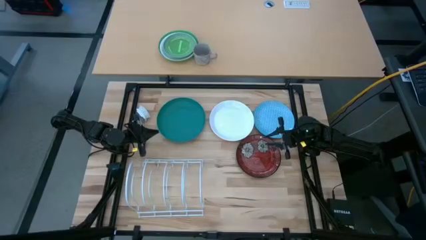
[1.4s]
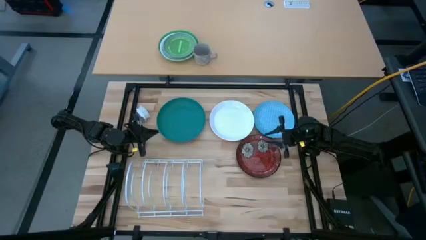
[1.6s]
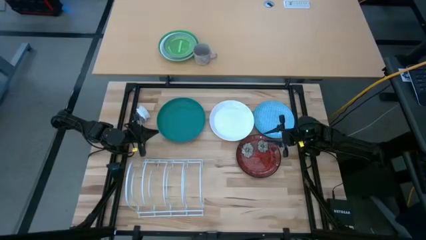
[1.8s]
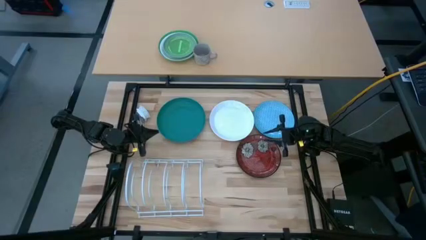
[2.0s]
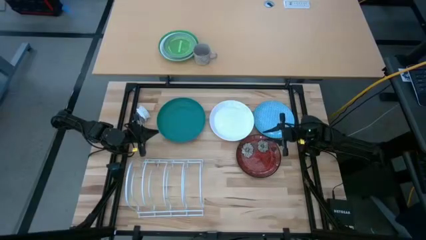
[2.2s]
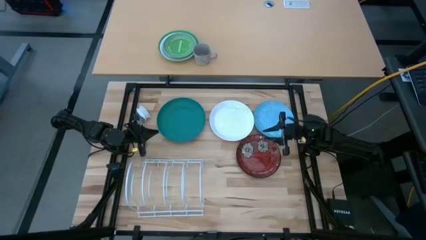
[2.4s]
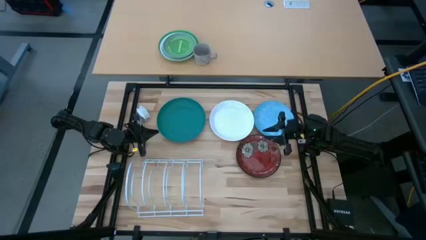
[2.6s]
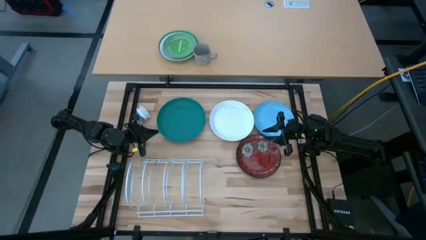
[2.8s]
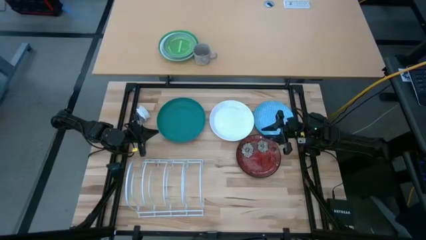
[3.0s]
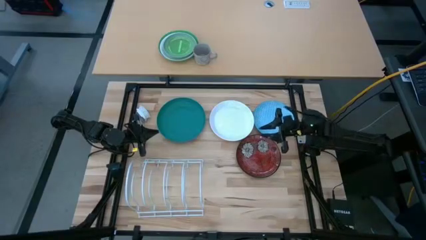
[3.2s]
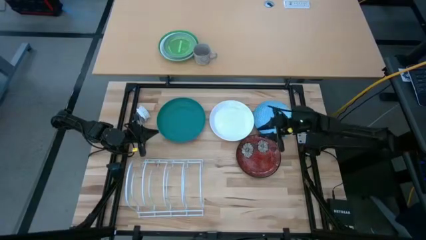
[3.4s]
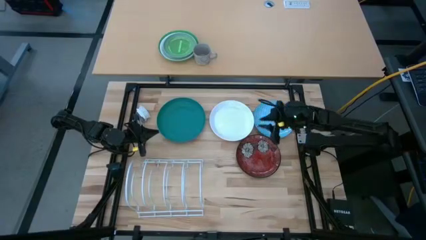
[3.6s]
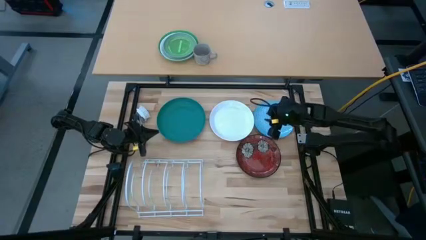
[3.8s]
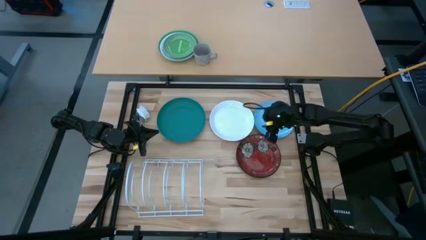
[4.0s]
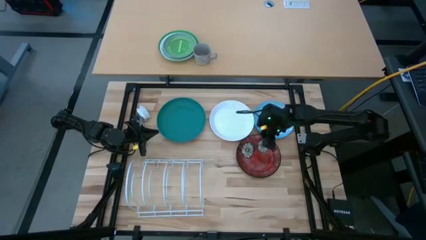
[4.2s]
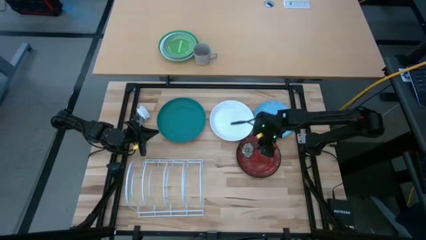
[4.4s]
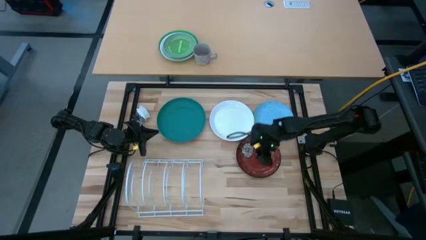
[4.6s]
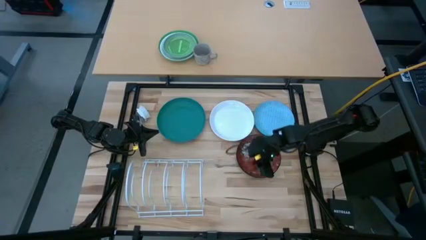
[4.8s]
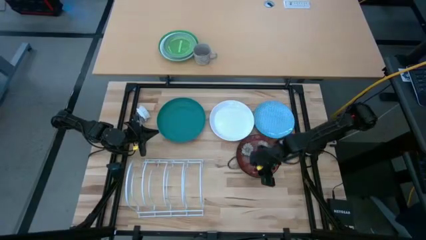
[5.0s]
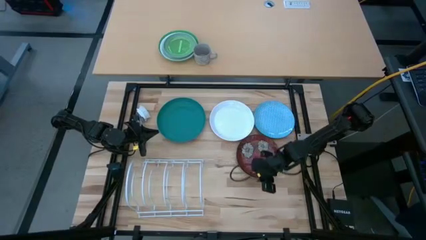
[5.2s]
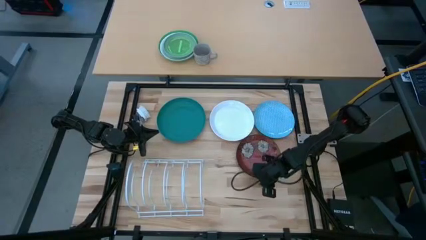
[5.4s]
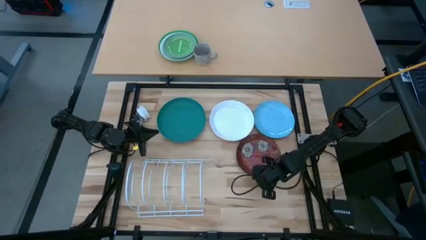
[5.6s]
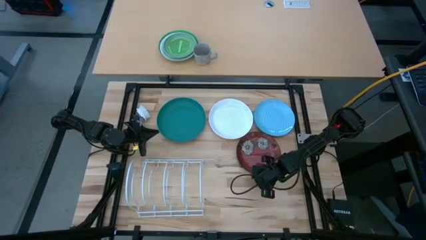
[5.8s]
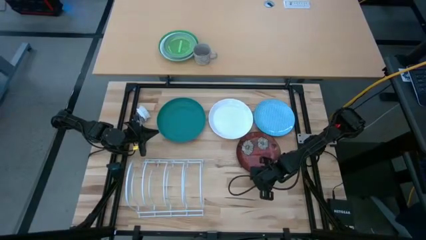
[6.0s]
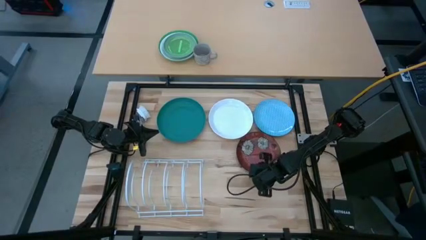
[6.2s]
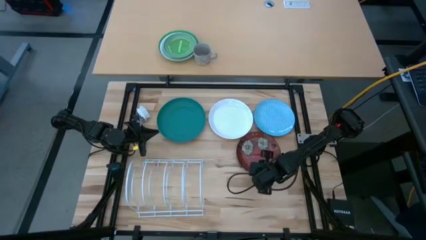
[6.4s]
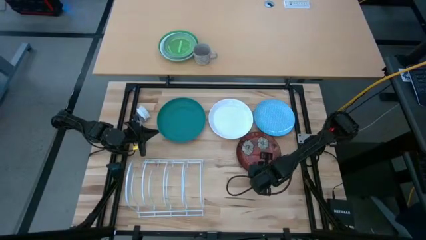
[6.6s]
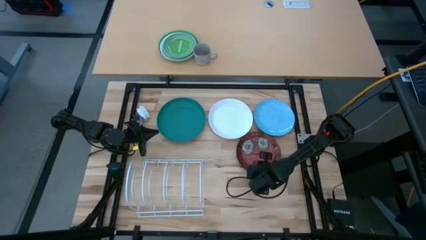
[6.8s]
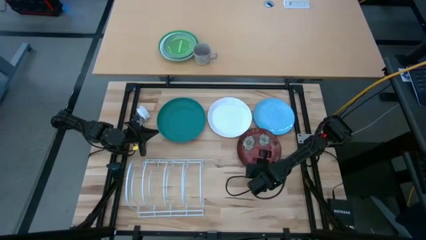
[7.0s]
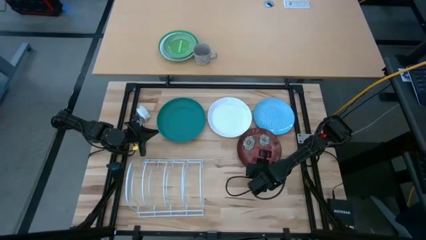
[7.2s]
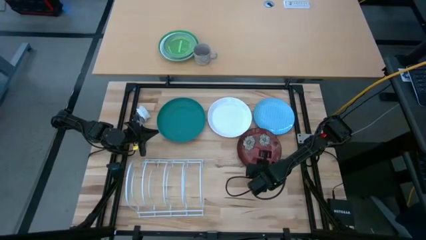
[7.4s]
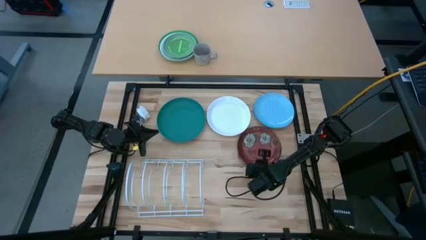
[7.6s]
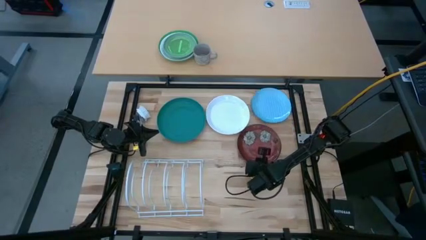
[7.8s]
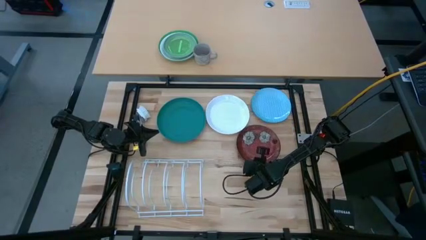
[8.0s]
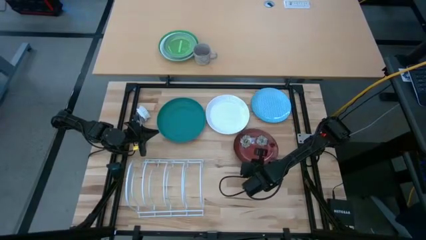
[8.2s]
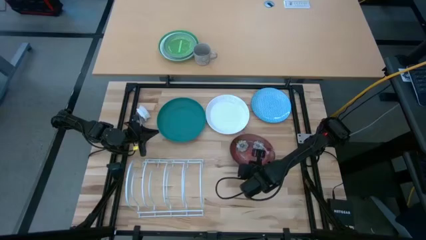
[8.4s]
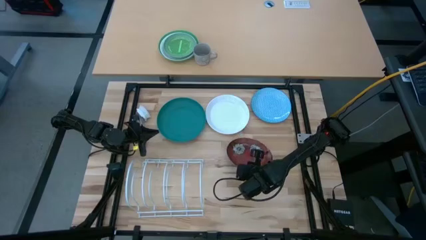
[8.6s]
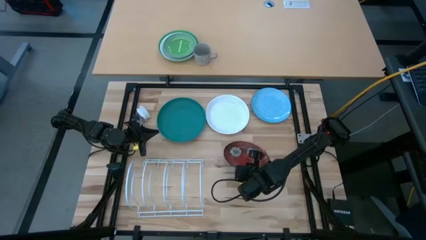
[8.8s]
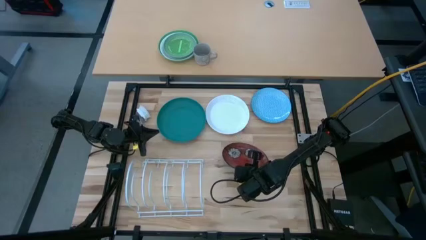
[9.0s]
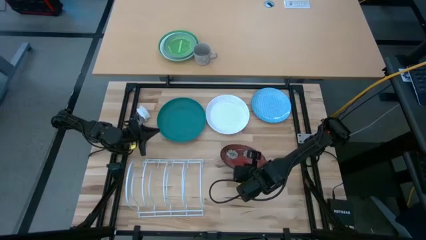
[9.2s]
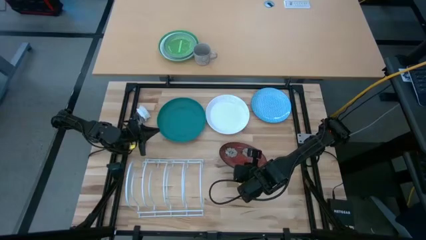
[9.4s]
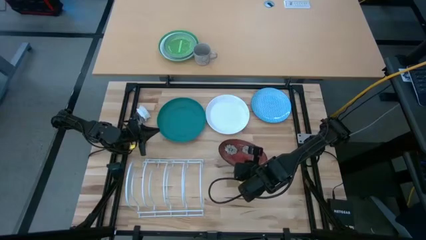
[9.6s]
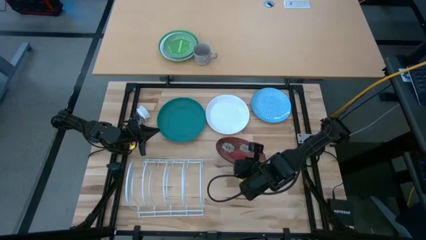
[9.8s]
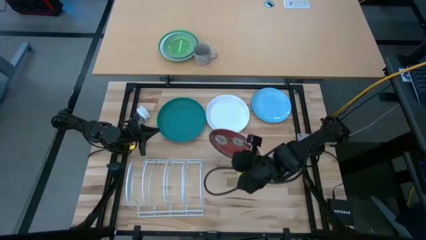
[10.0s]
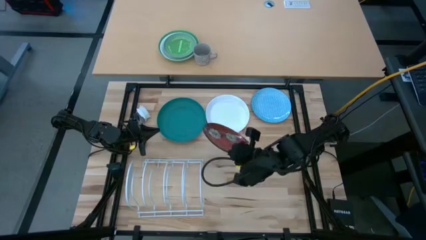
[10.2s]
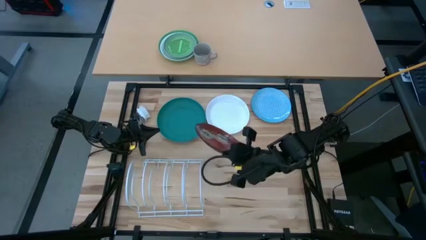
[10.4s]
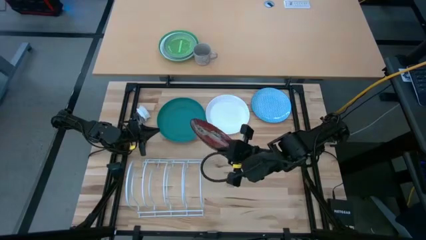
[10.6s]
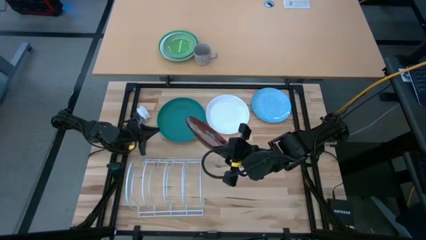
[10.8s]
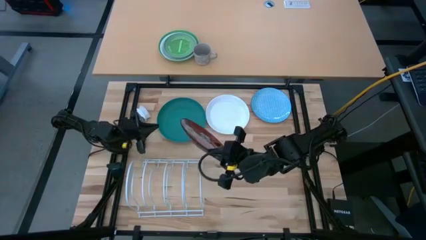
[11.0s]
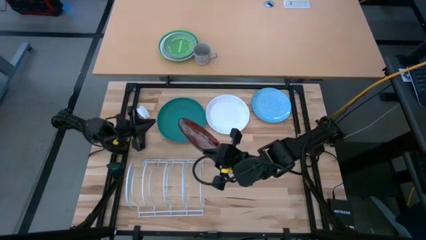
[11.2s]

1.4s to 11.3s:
Task: Sort dishes
Put the red plate into the dish rack

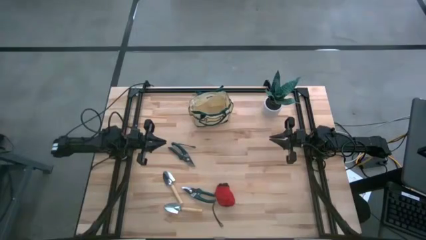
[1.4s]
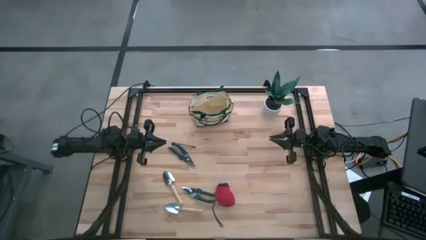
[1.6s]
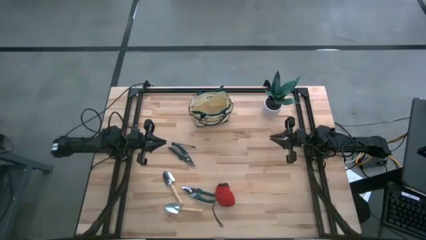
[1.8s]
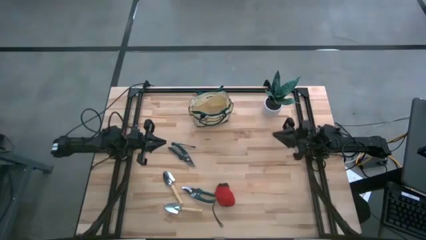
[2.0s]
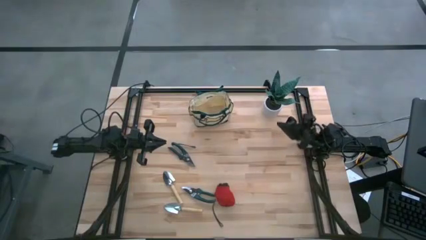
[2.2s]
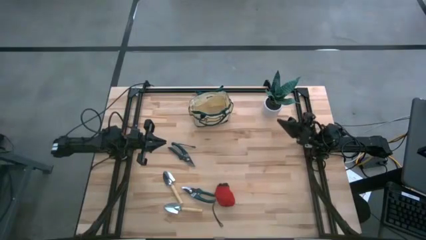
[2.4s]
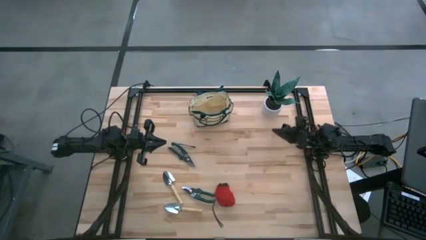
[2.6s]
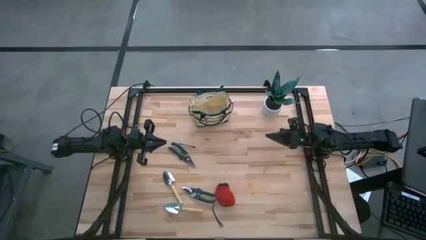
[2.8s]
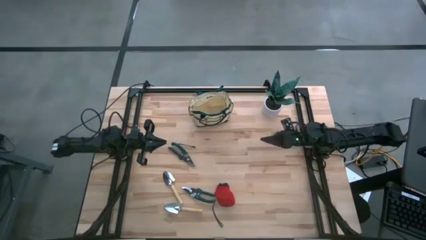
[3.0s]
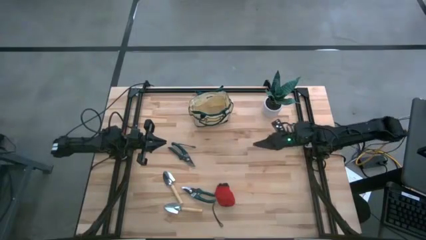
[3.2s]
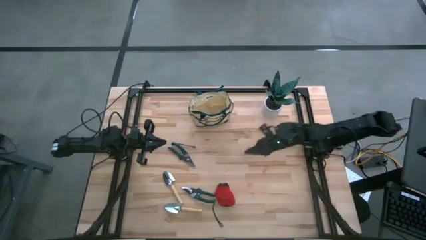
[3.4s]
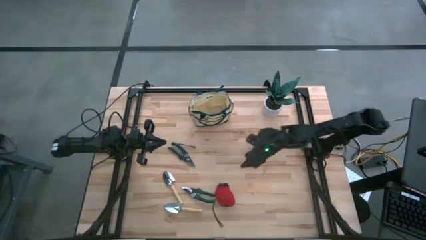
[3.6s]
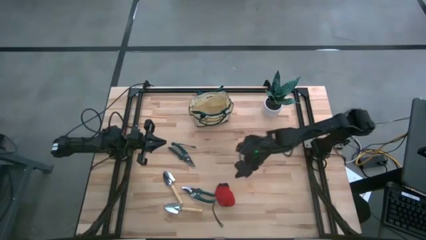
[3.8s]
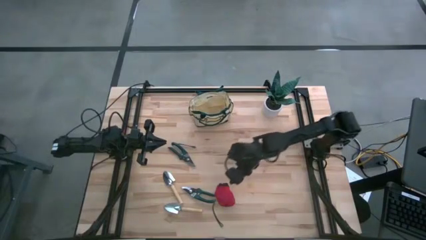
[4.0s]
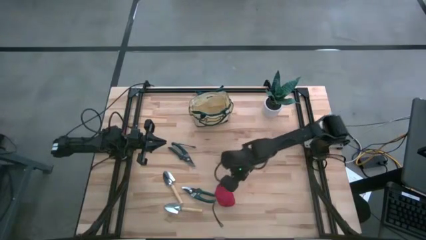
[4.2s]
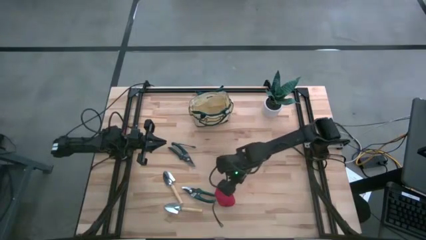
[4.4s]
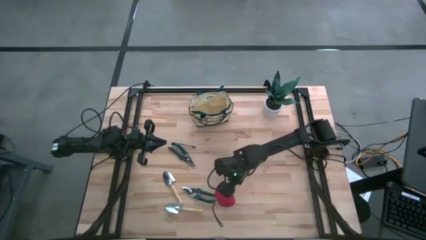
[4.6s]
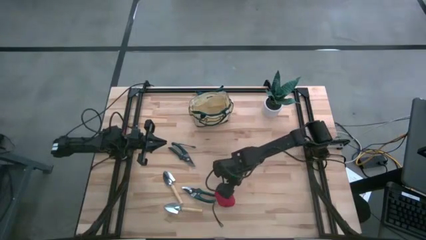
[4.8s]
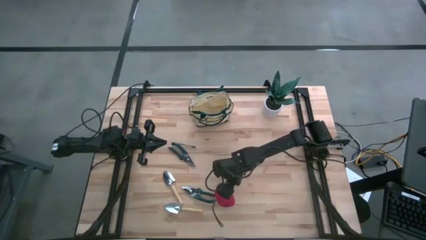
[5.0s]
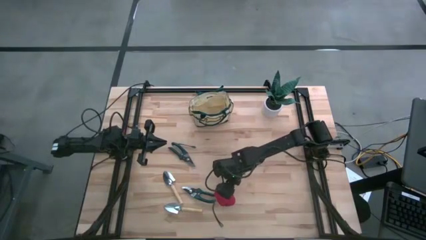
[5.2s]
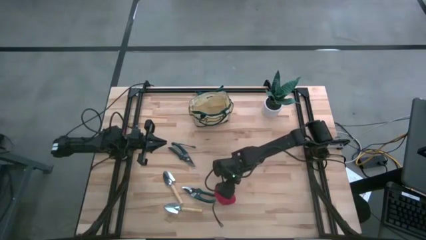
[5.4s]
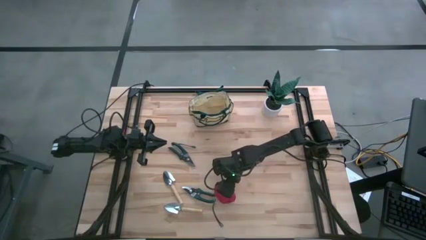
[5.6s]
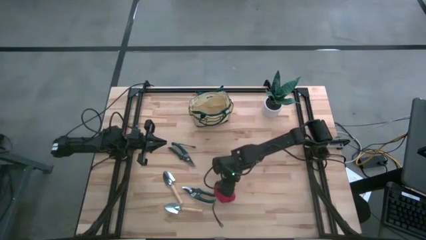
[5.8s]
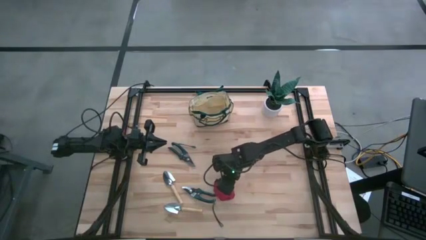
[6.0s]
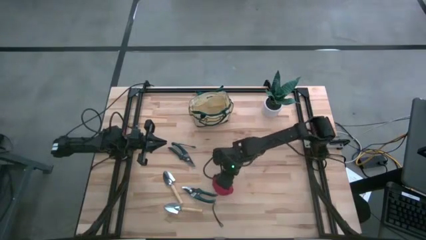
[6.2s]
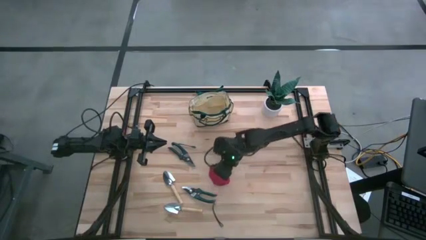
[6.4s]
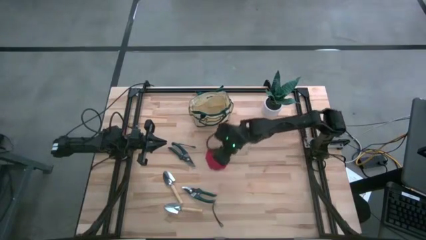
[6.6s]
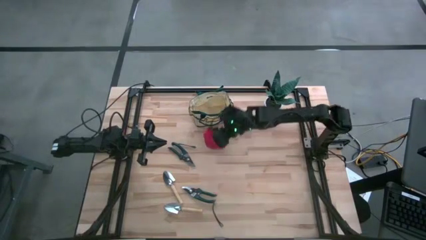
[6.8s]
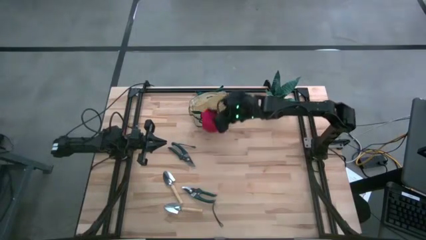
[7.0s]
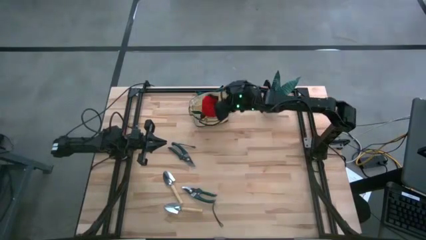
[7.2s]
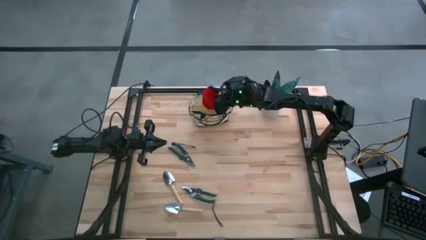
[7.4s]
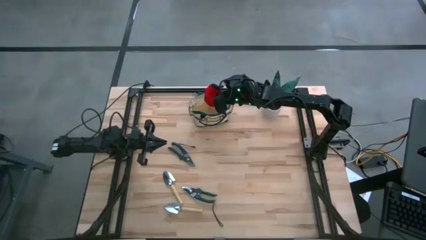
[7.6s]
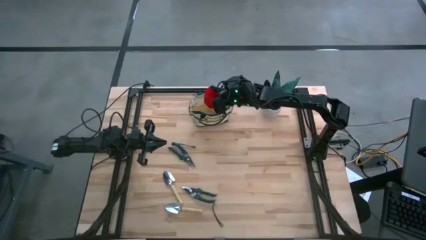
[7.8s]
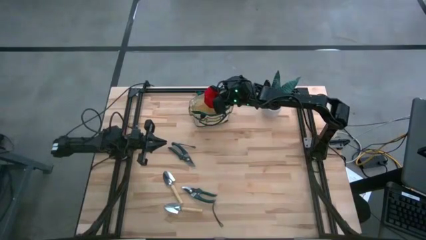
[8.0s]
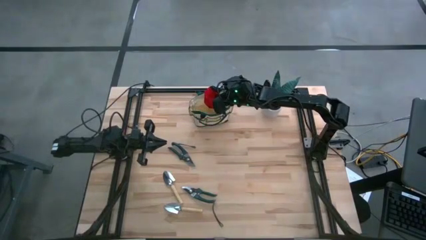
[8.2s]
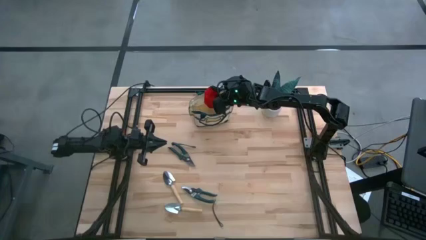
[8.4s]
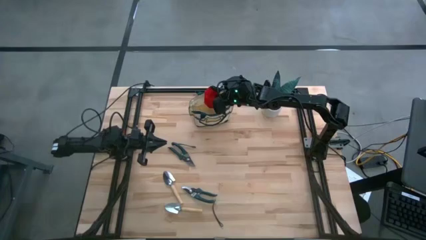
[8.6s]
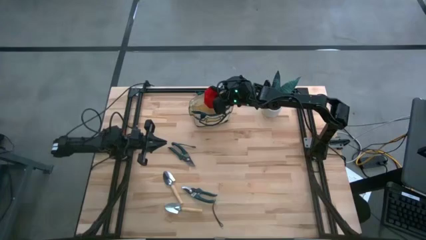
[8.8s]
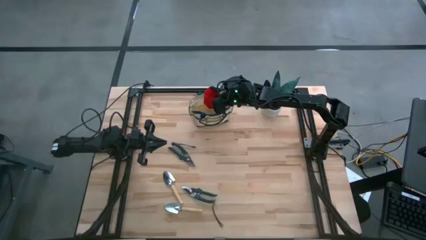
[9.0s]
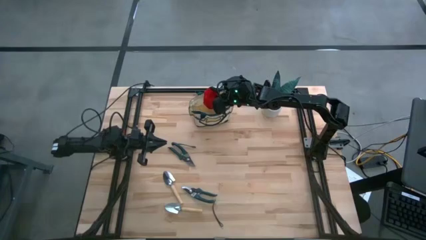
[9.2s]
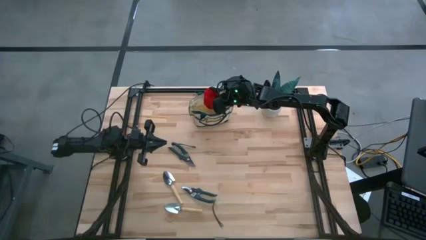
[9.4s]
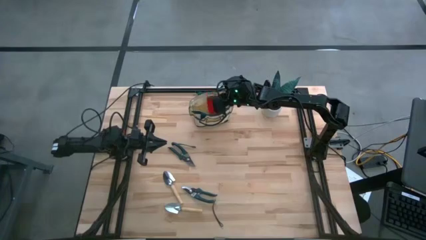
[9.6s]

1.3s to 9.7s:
Task: Pick & Place Garden tools in Gardening bag
Put the red gloves into the bag
